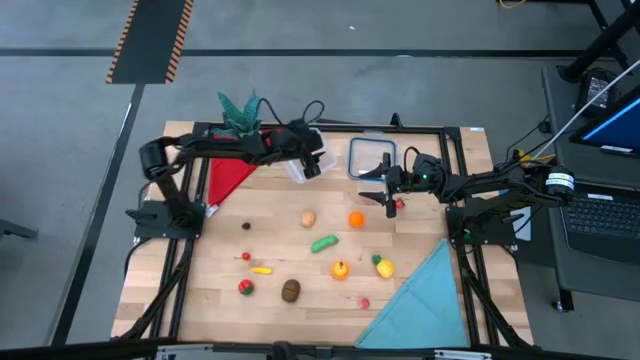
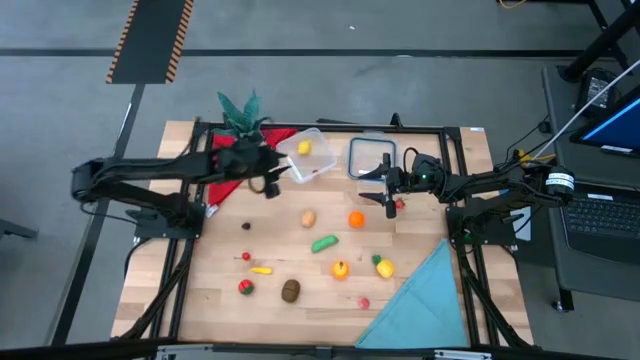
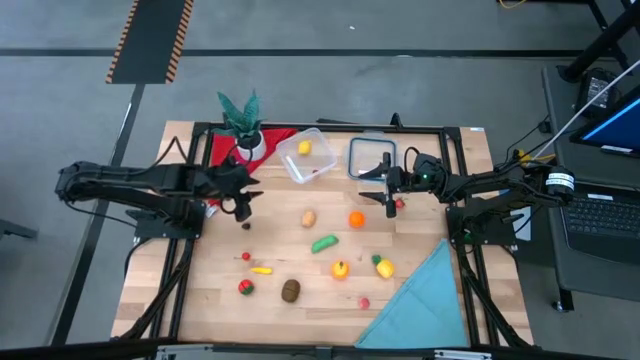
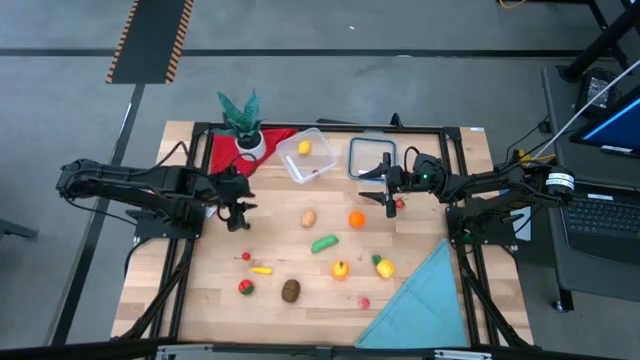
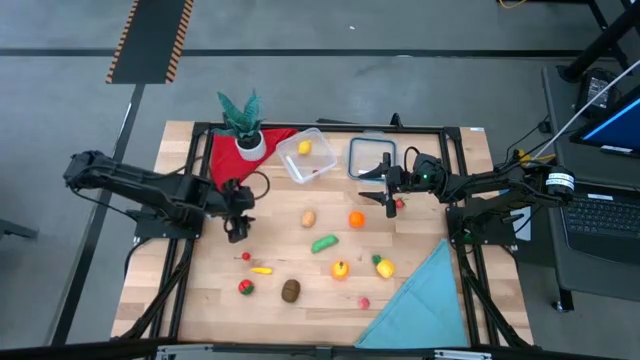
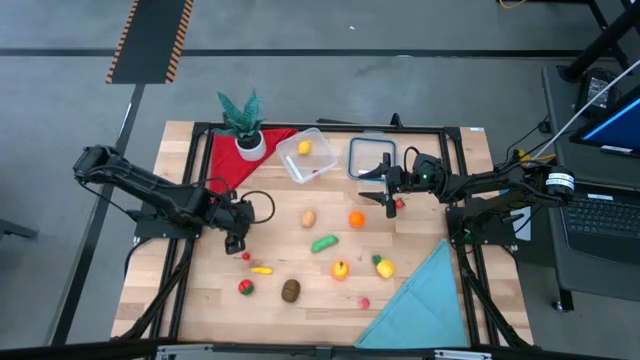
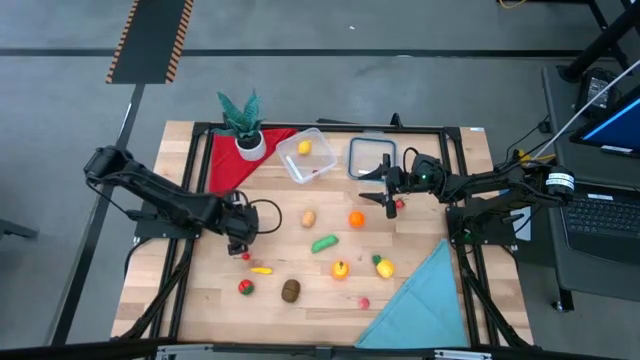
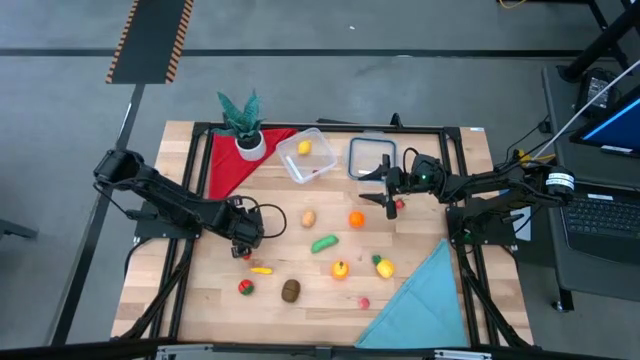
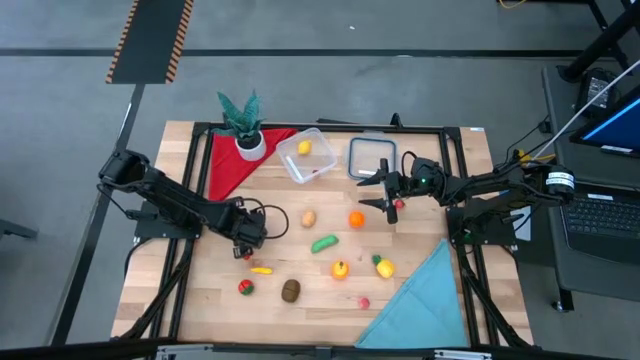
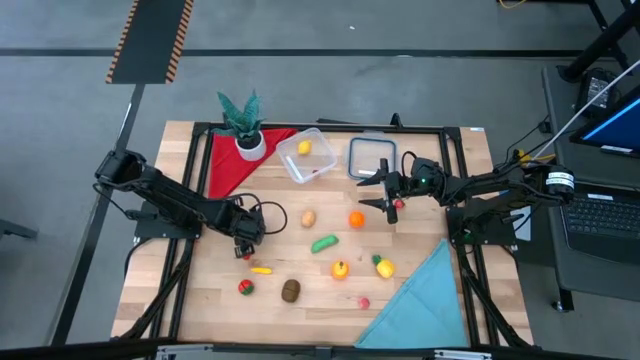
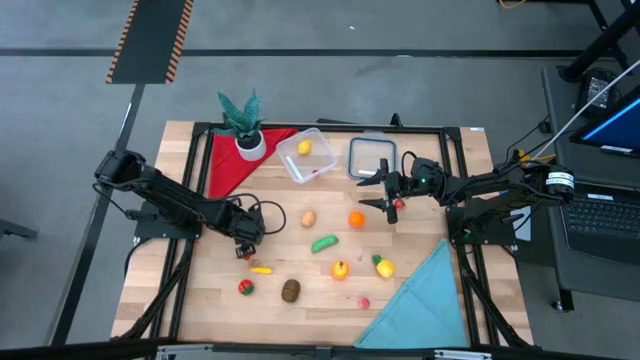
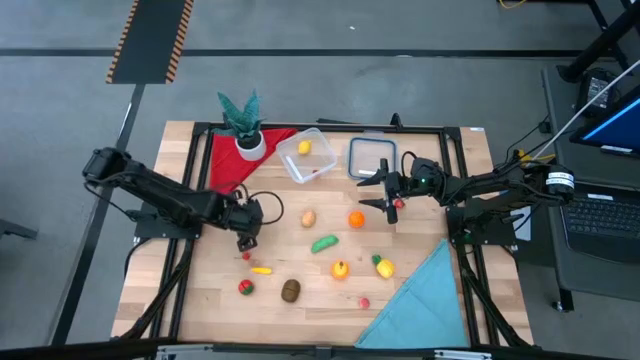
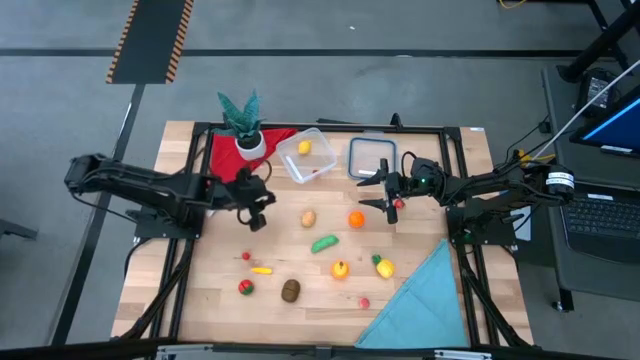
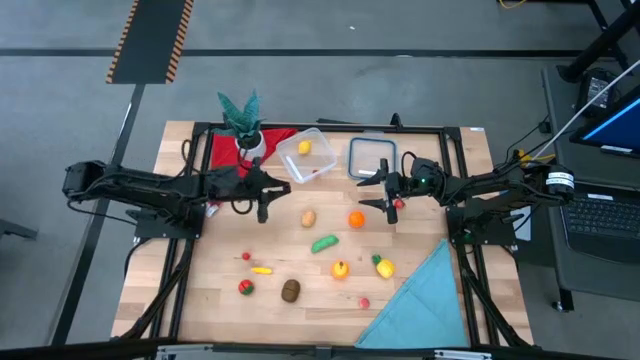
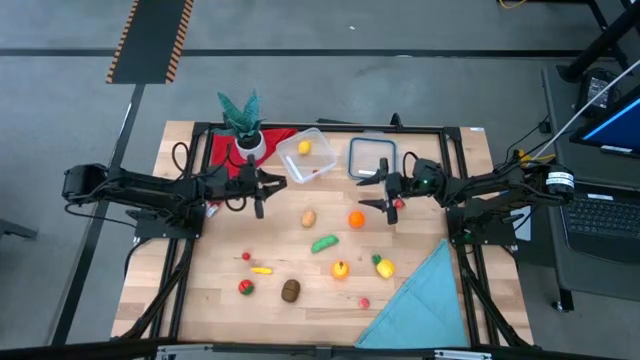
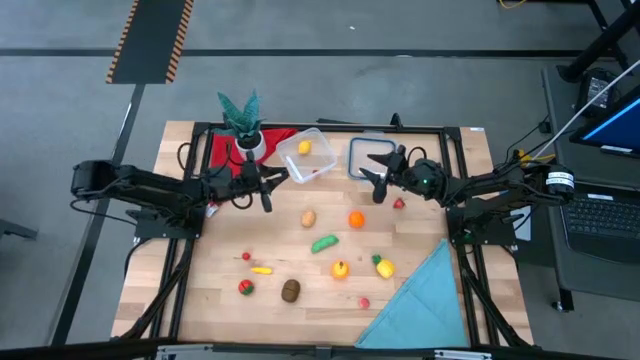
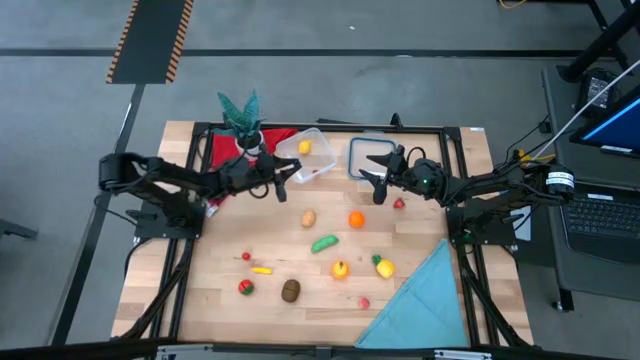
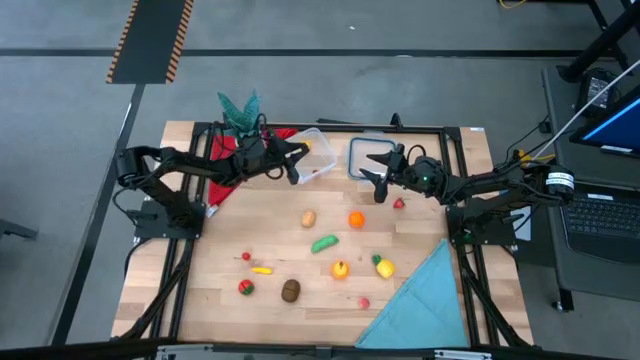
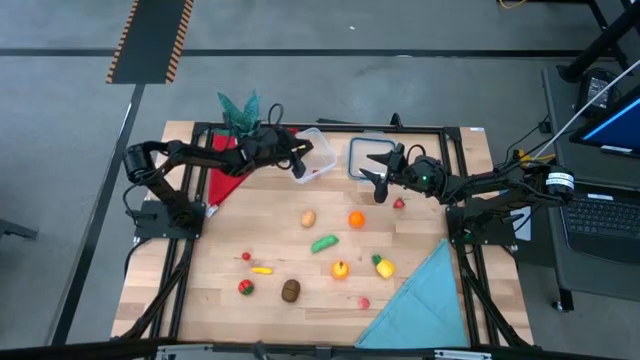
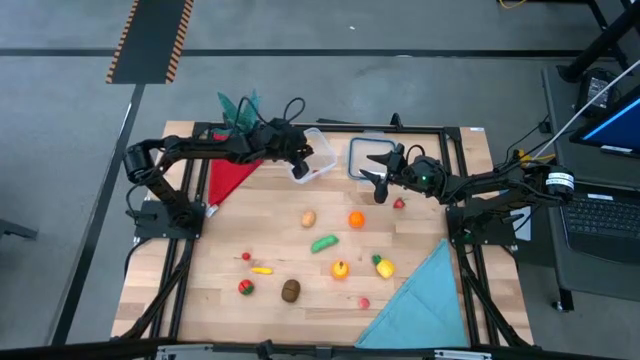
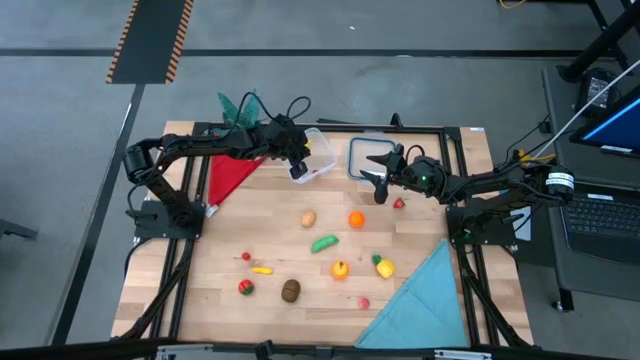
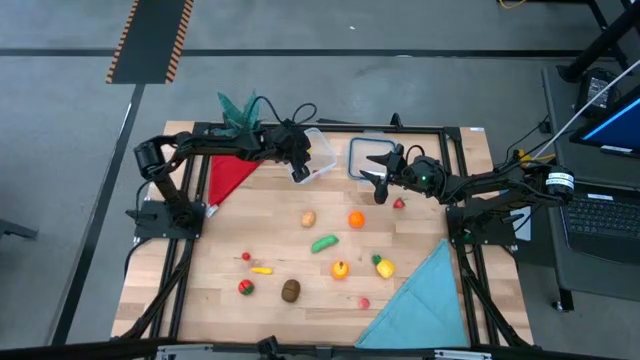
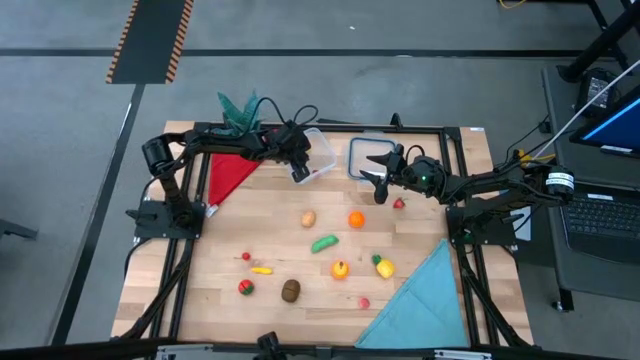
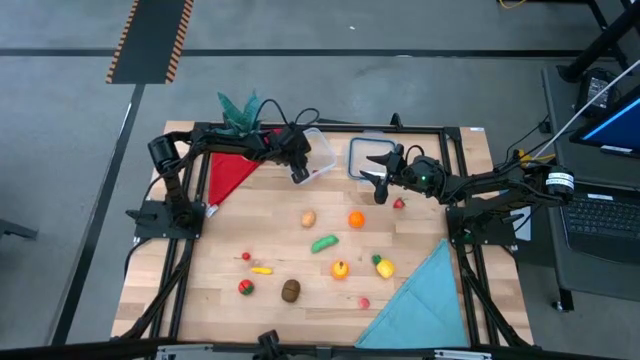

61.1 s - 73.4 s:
Task: Pick and placing Produce into tupperware
Put the blackberry into the transparent bin

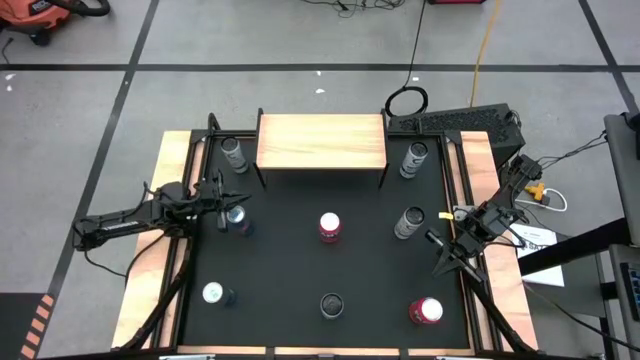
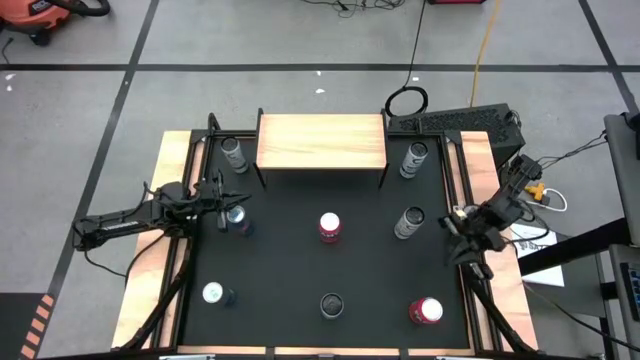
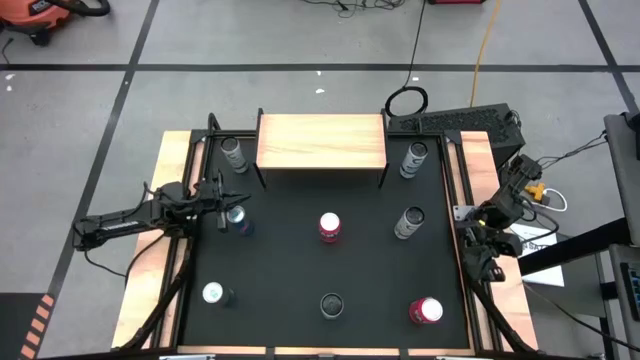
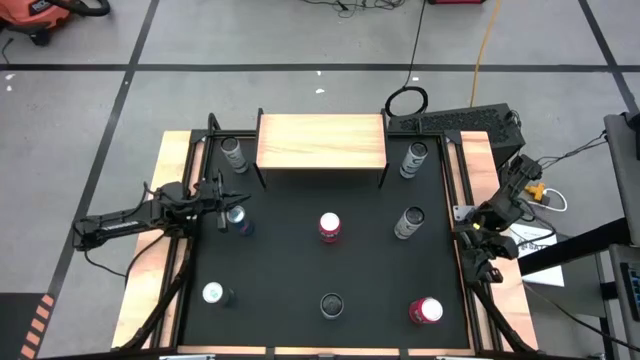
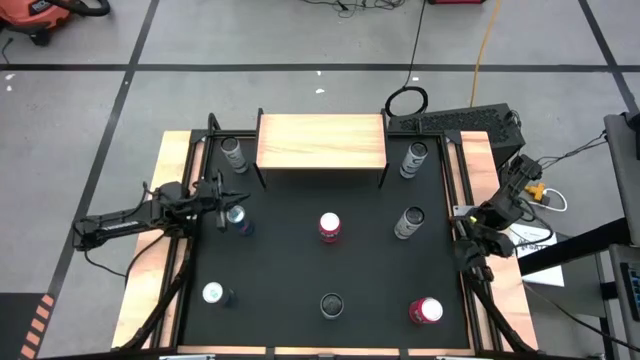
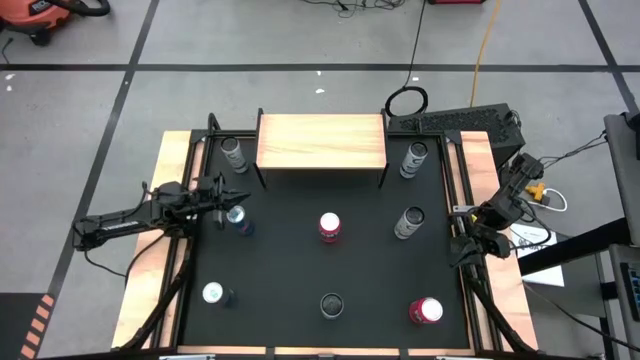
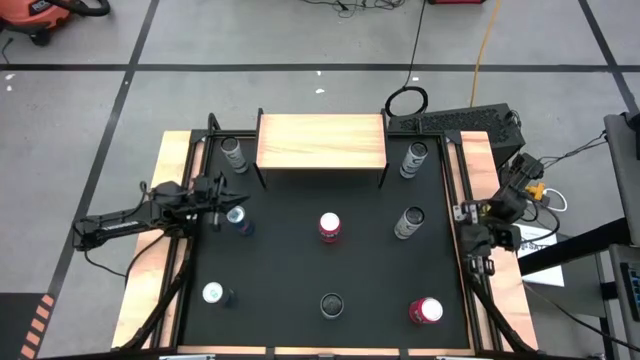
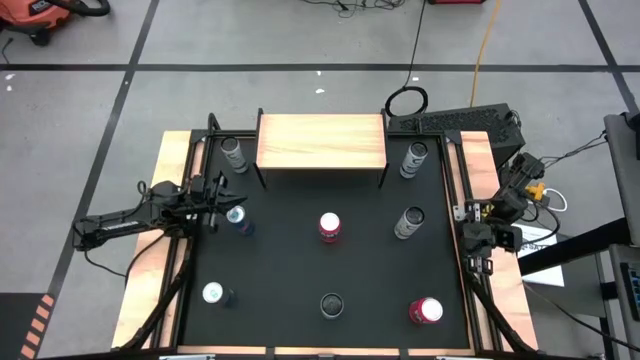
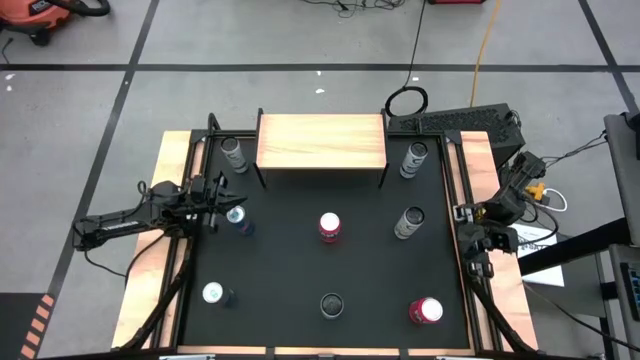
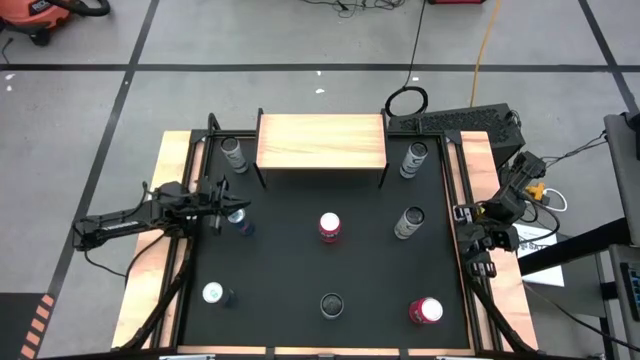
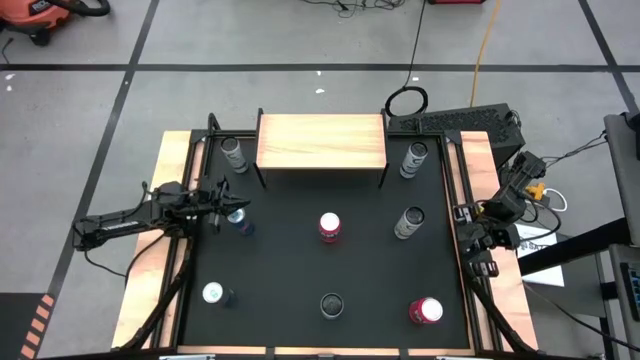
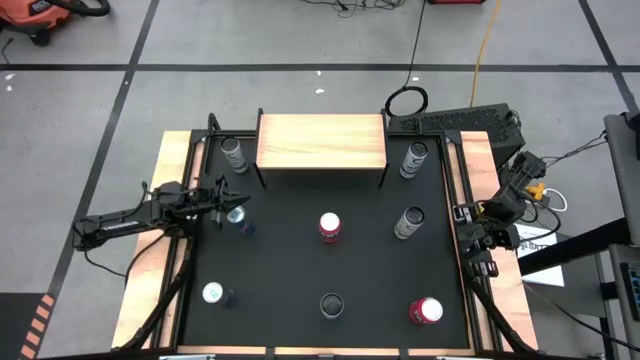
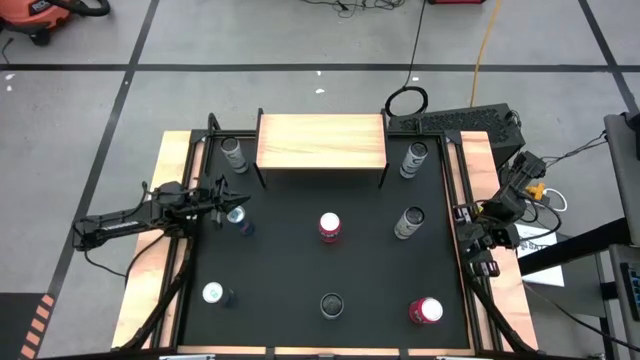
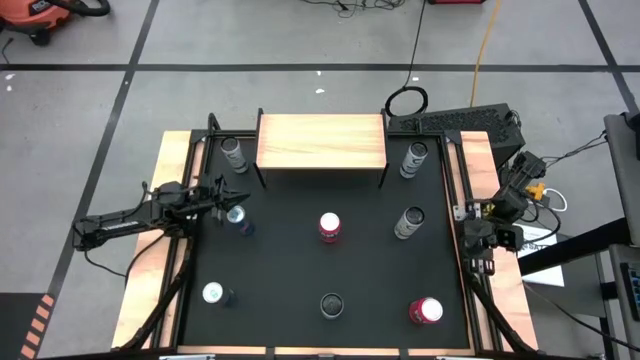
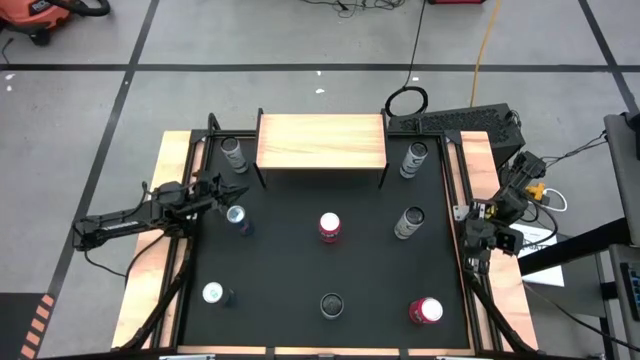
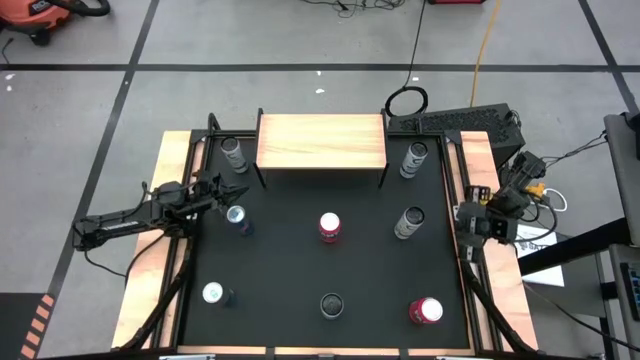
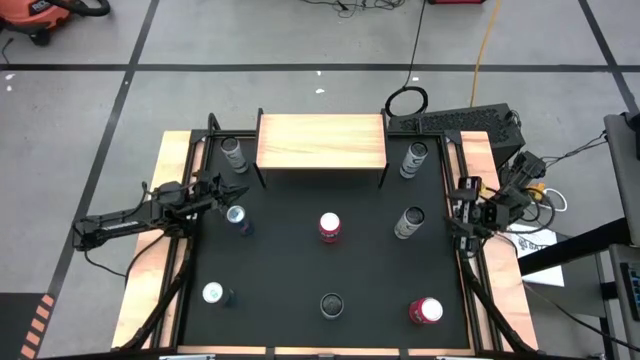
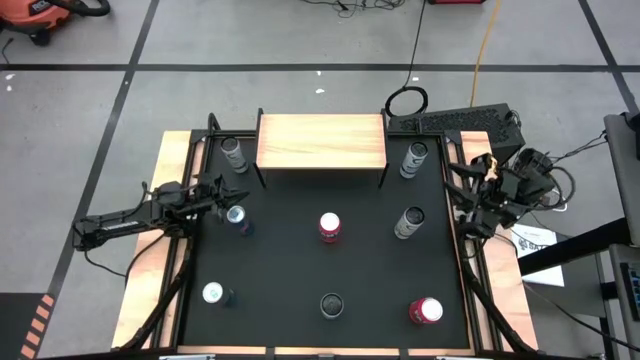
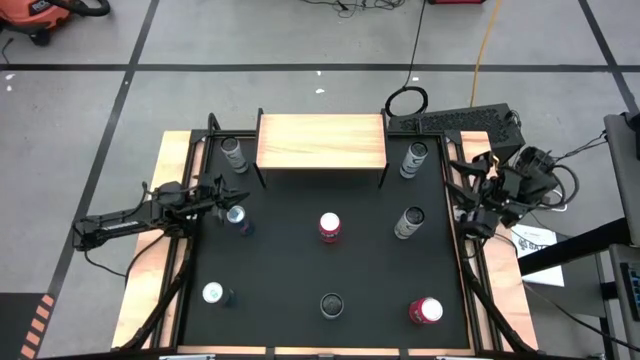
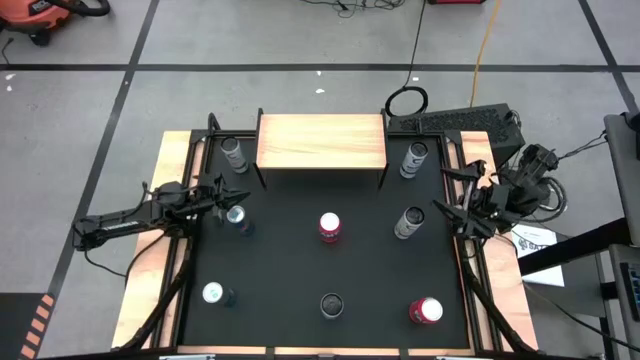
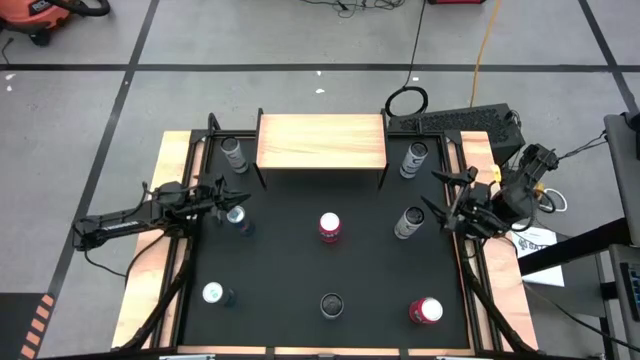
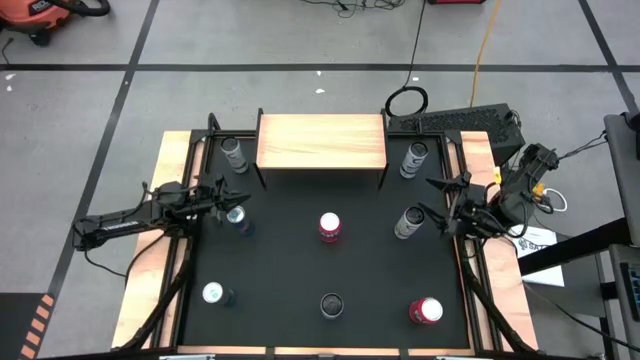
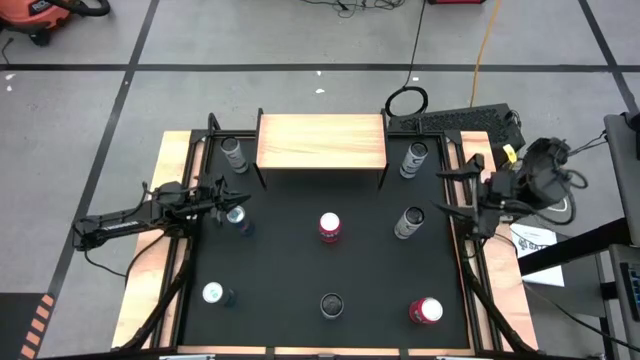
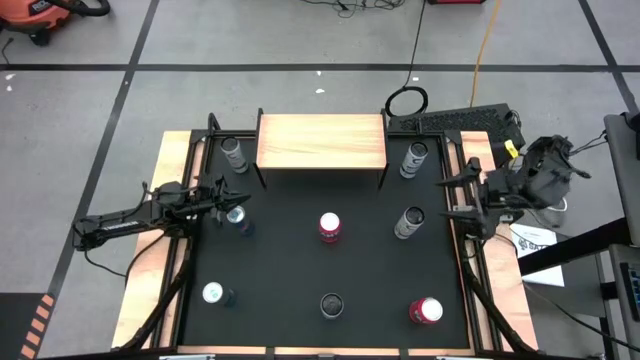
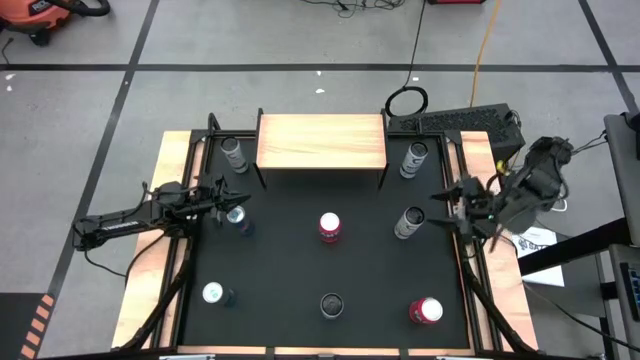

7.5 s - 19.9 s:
Task: Place canned beverage on shelf
Put the bottom white-yellow soda can on the shelf
